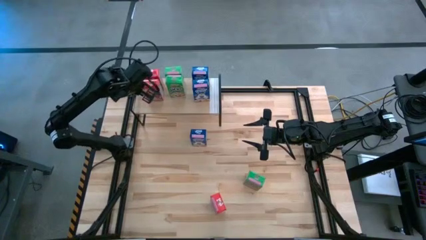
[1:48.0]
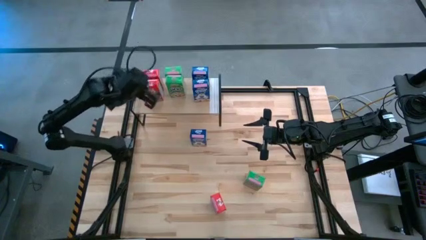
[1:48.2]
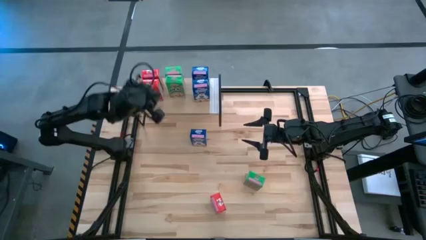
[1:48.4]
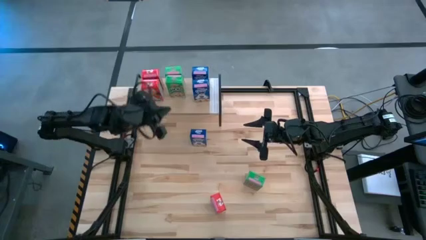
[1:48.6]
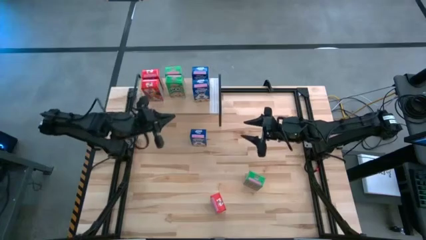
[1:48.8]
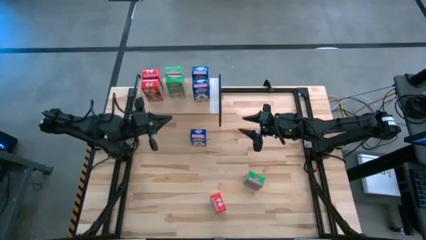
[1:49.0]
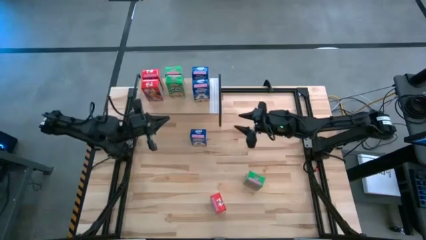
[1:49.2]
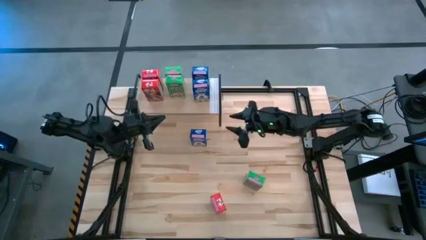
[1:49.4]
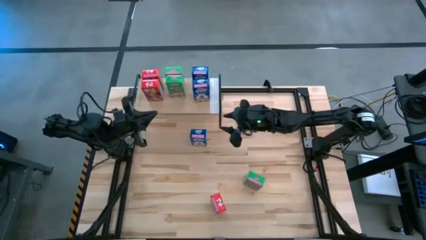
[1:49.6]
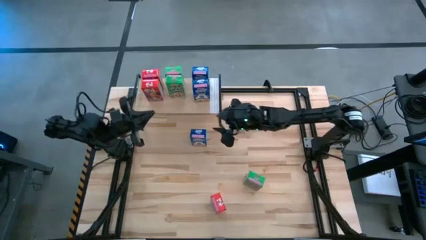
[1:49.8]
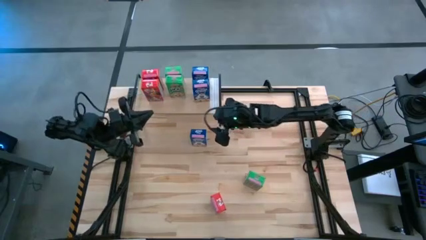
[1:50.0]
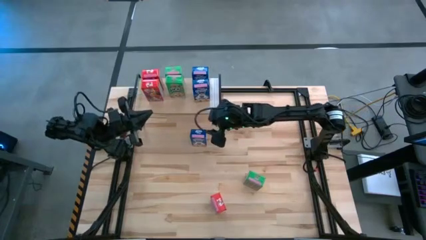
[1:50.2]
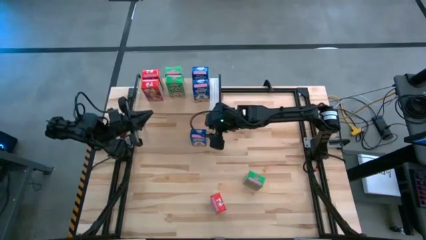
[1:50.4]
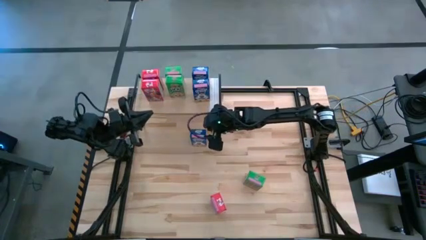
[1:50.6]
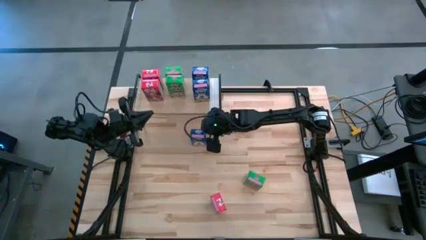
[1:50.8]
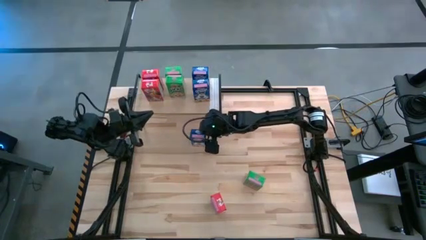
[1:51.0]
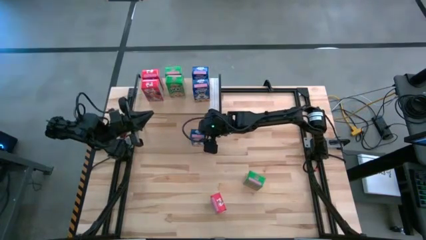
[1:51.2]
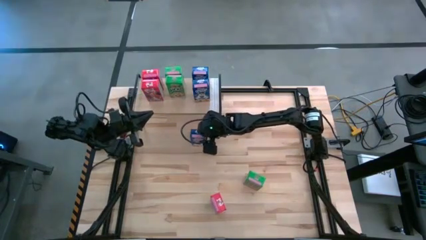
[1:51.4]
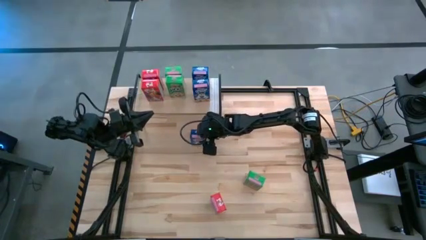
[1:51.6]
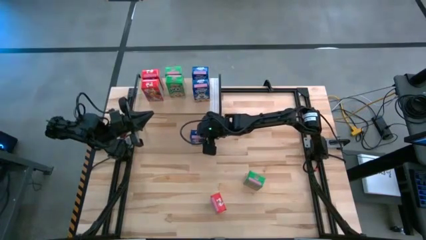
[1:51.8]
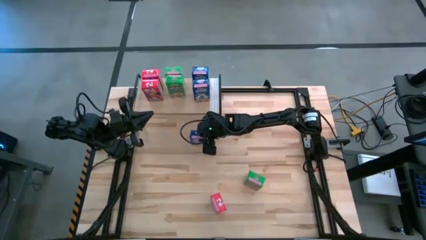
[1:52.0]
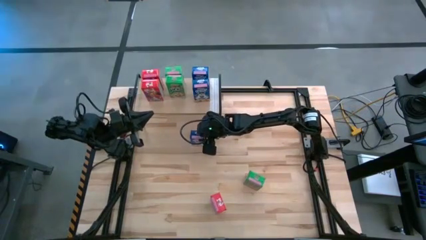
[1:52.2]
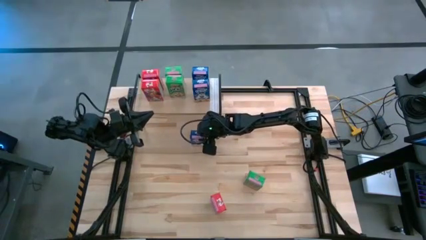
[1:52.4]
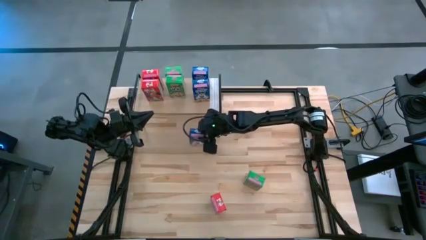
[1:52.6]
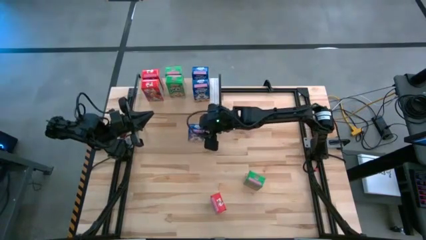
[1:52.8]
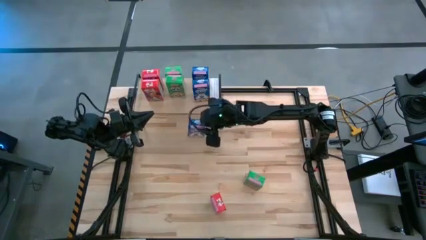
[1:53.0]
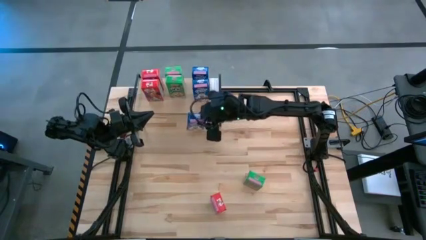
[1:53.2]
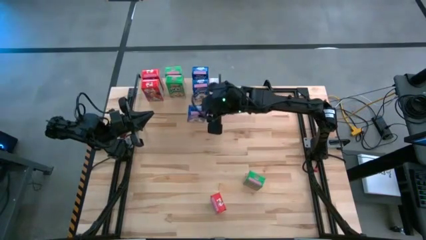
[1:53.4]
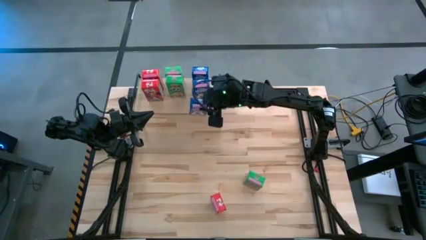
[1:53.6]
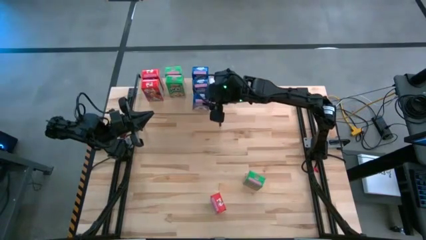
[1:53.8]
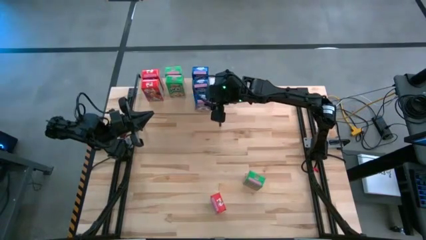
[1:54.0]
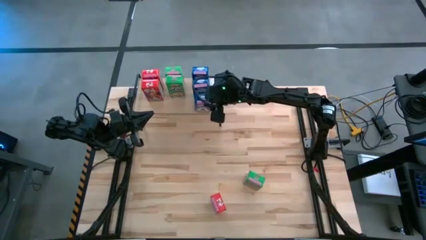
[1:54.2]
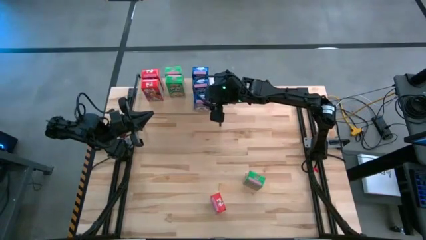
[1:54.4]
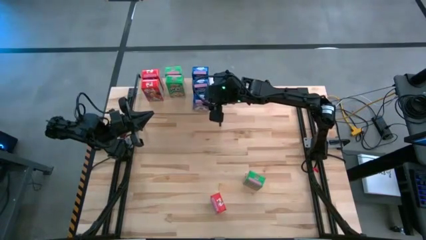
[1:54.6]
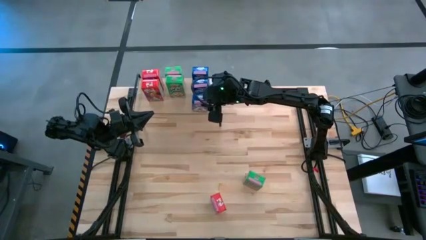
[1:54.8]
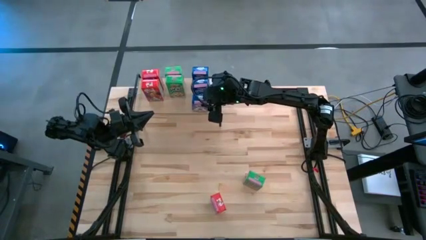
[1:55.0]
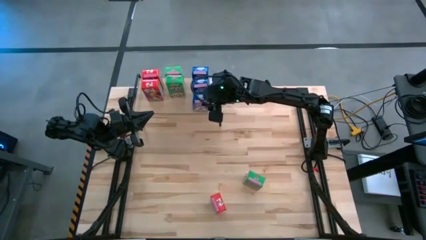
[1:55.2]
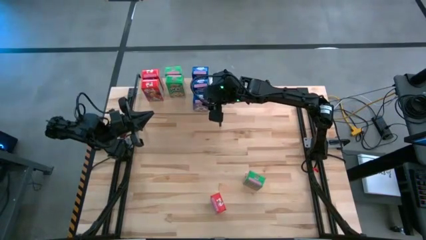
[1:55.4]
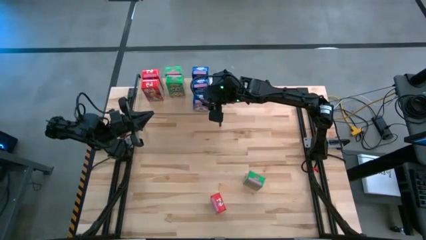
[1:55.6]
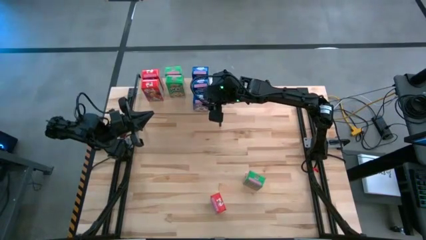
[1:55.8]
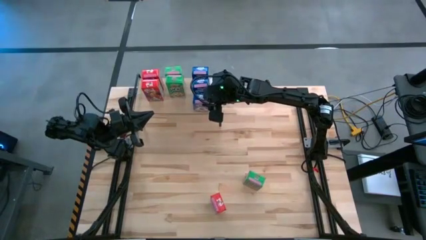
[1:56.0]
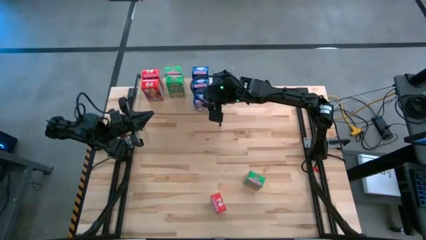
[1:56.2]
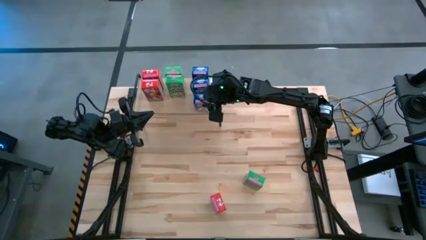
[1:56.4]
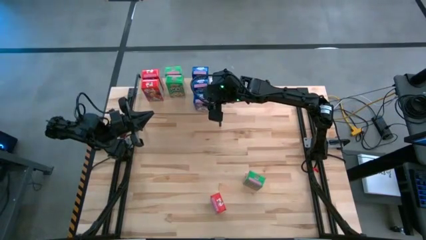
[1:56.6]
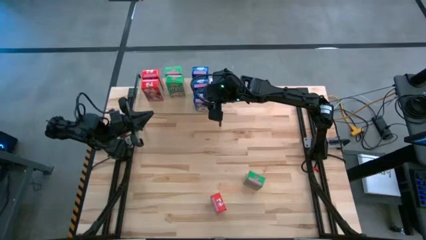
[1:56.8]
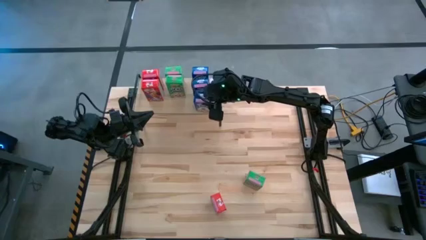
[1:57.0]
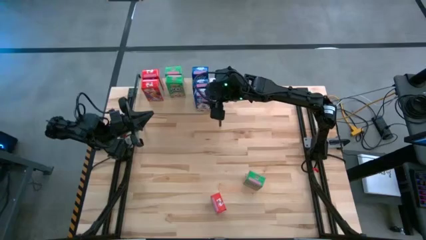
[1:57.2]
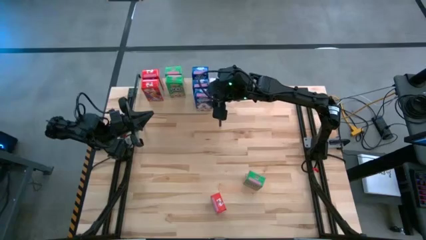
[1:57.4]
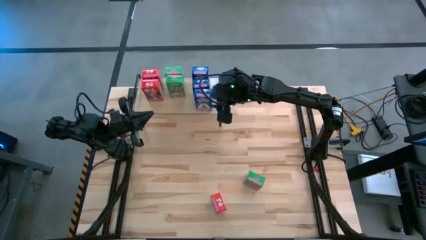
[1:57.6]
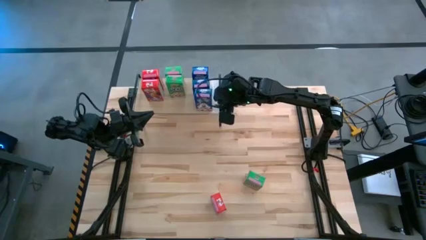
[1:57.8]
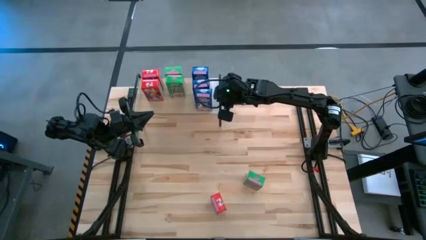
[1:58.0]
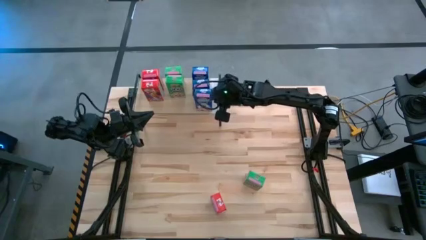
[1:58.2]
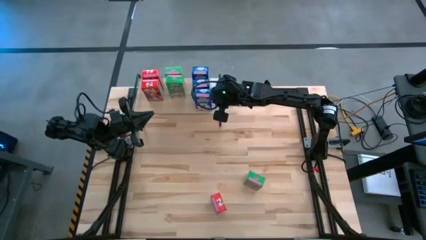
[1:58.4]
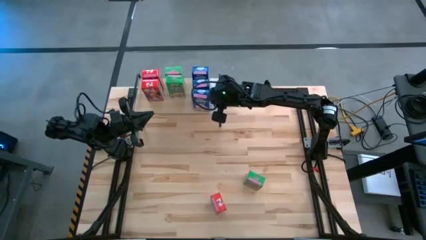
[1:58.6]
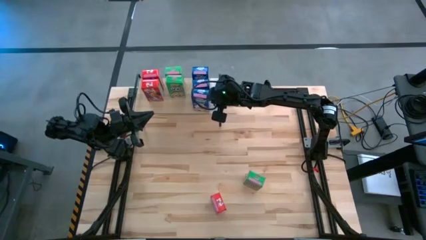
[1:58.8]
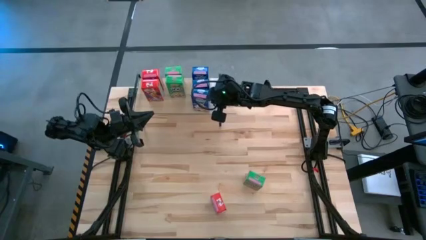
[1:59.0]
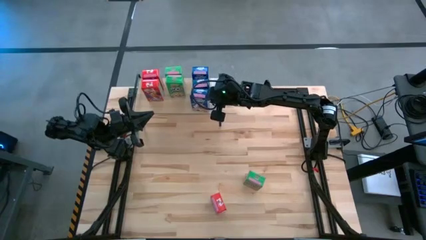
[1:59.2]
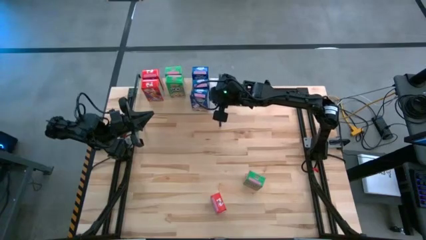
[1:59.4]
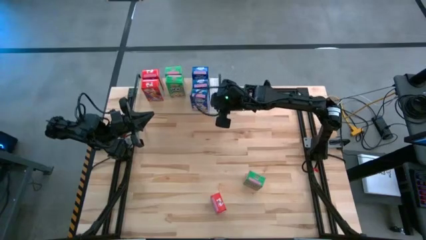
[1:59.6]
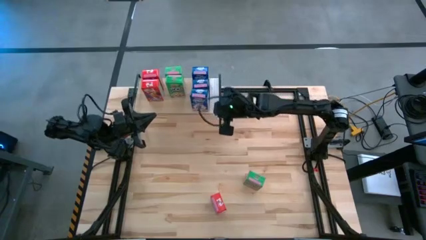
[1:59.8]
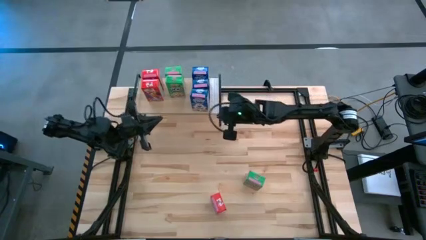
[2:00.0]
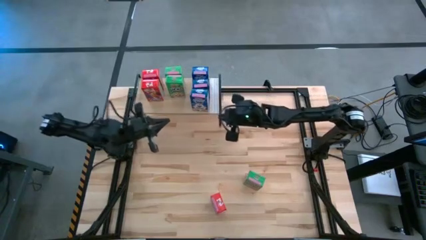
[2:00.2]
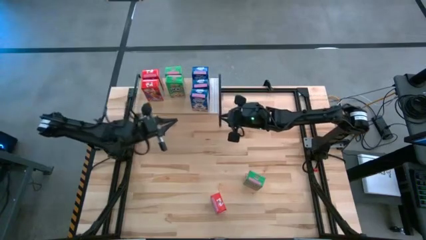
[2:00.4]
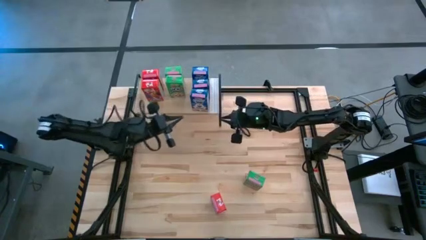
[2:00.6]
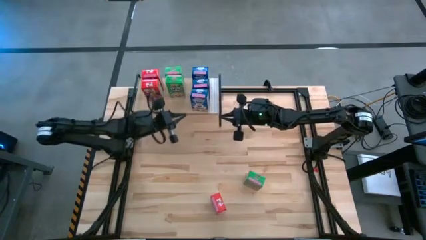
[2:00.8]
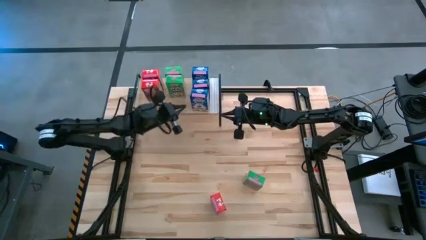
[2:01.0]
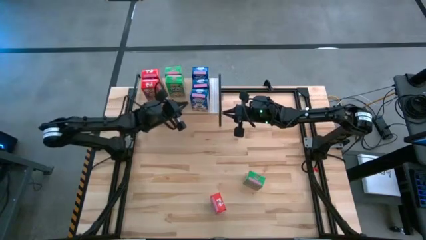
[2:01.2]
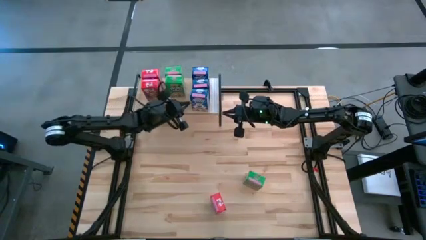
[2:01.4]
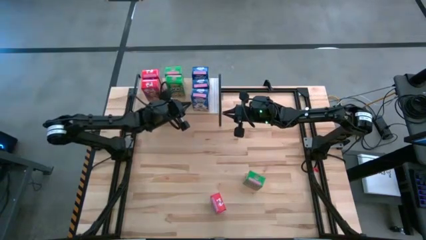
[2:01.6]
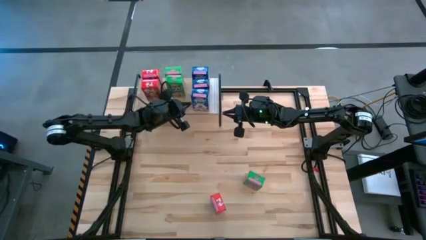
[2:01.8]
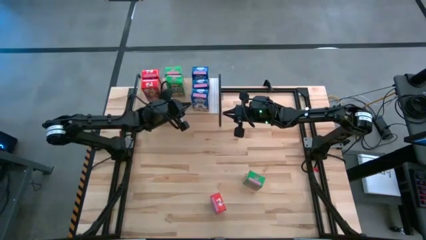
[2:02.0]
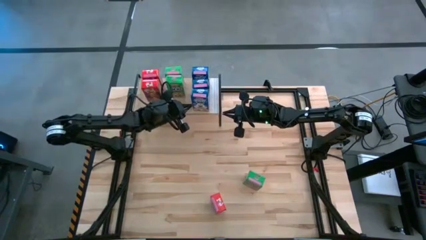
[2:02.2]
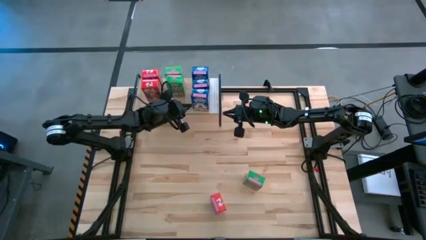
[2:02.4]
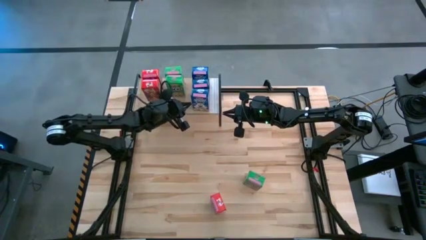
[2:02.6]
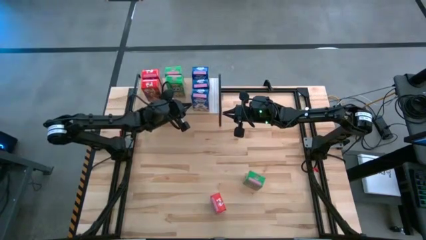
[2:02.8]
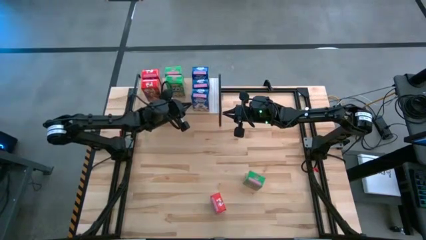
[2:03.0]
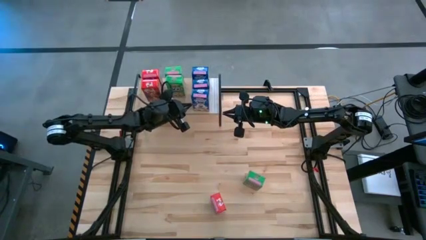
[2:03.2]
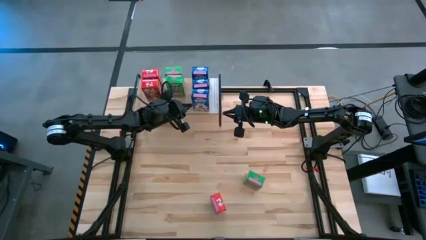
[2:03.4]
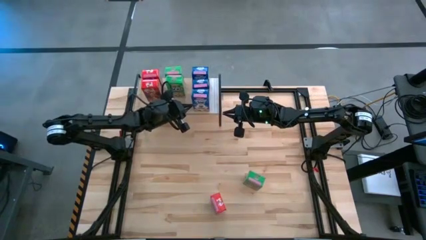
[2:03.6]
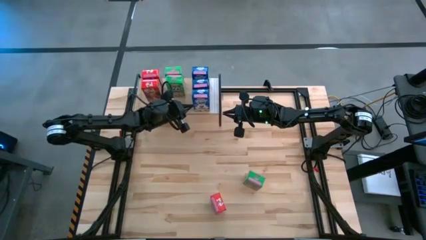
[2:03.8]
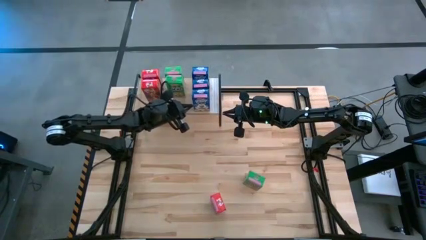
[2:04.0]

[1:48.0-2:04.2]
Task: Stack cereal on shelf
Put the blue cereal box on the shelf aligned with the other blue cereal boxes
